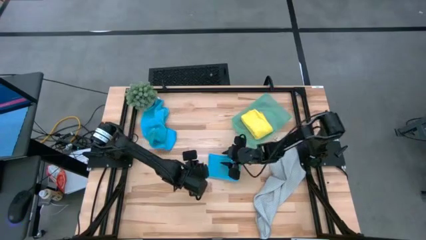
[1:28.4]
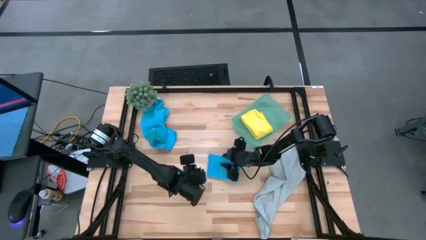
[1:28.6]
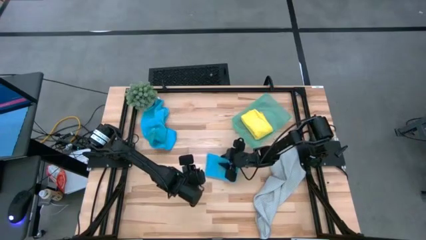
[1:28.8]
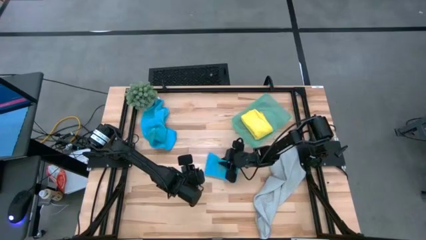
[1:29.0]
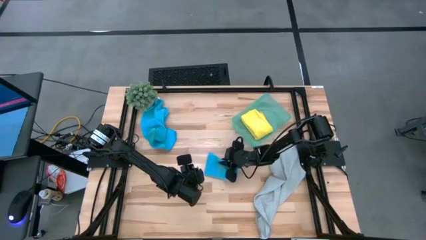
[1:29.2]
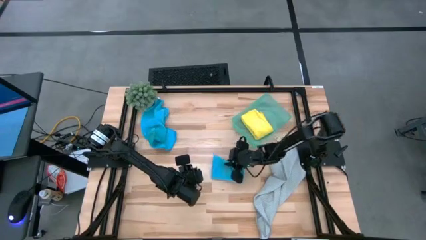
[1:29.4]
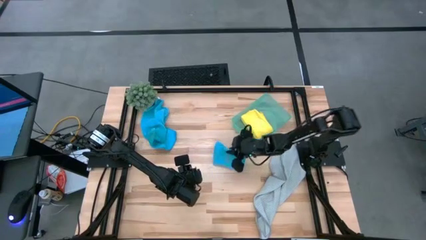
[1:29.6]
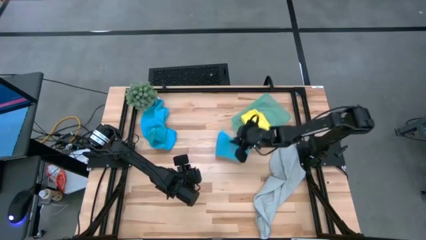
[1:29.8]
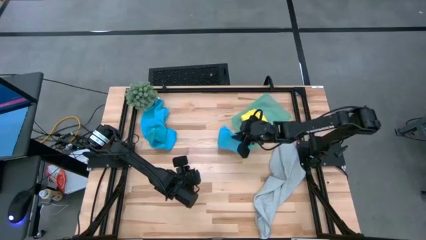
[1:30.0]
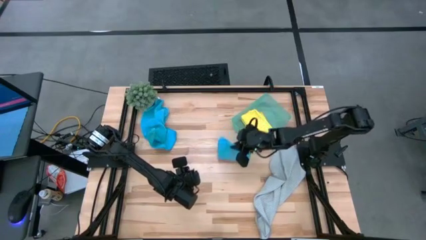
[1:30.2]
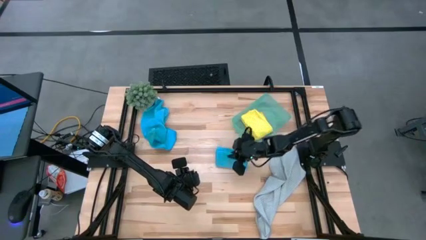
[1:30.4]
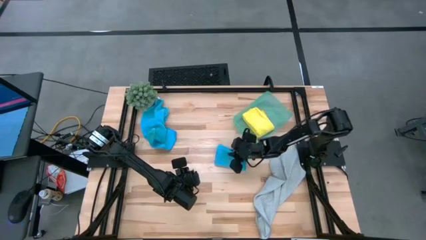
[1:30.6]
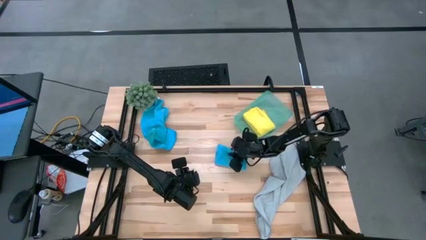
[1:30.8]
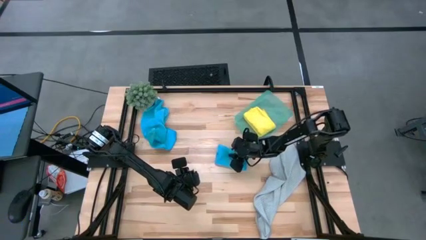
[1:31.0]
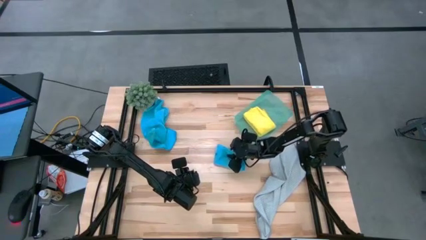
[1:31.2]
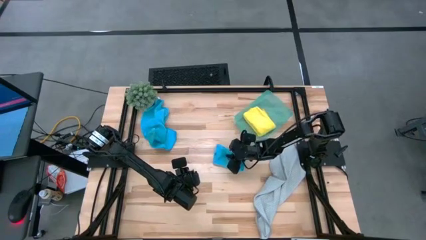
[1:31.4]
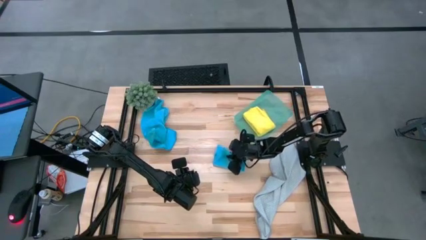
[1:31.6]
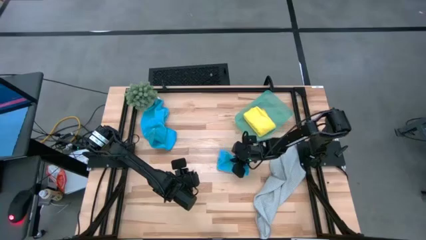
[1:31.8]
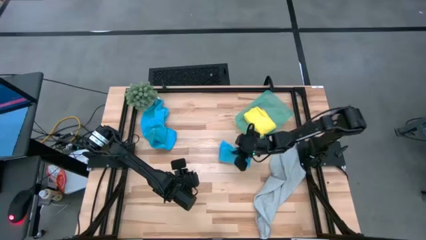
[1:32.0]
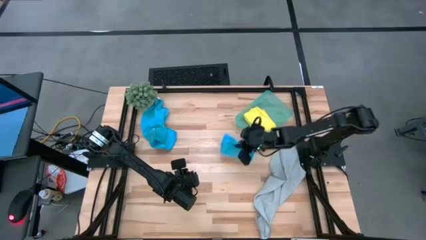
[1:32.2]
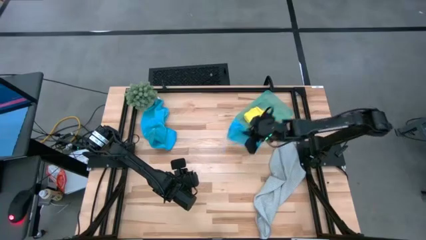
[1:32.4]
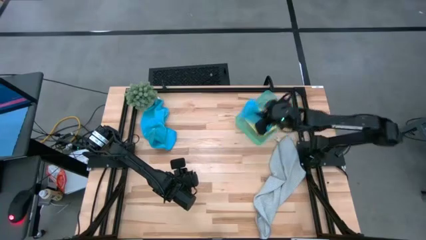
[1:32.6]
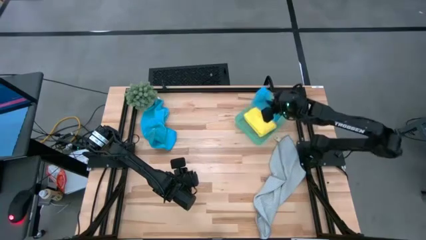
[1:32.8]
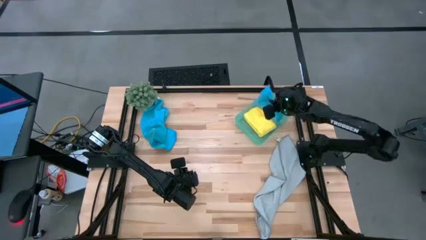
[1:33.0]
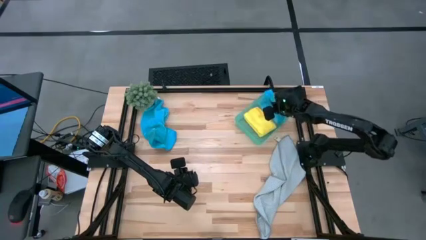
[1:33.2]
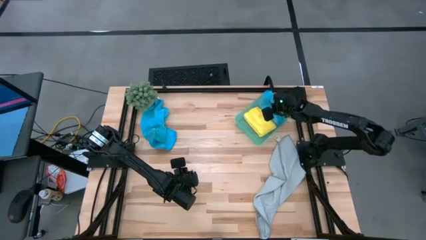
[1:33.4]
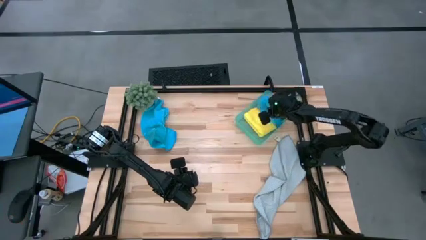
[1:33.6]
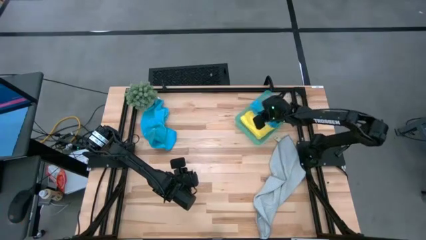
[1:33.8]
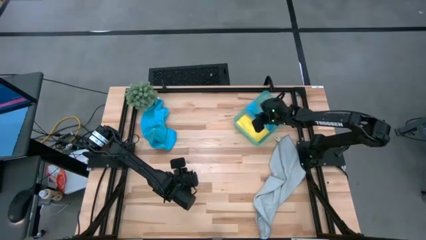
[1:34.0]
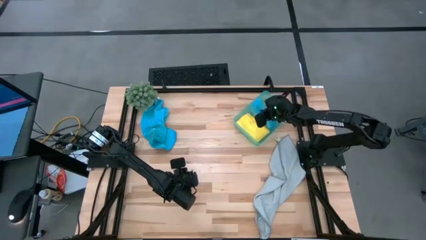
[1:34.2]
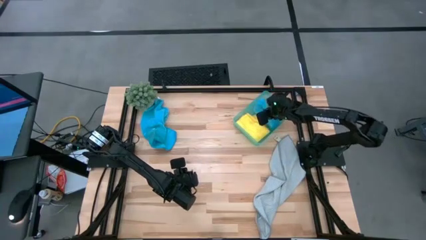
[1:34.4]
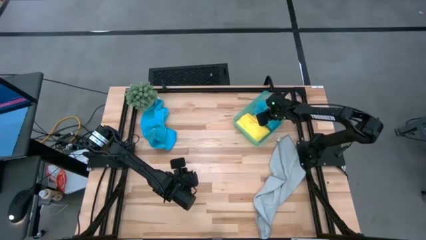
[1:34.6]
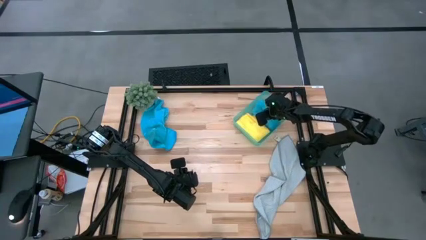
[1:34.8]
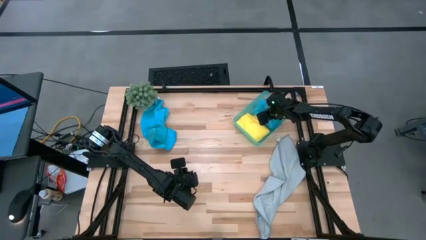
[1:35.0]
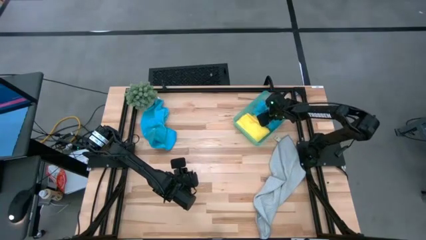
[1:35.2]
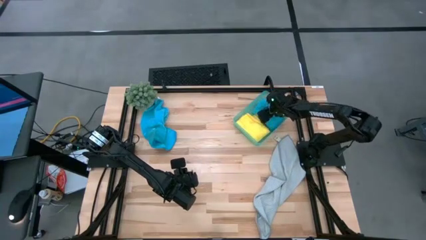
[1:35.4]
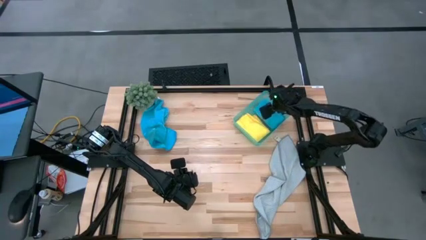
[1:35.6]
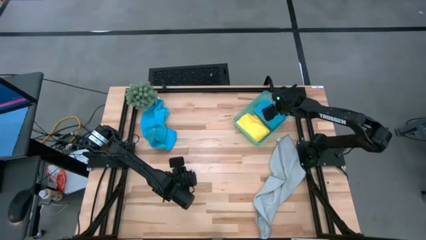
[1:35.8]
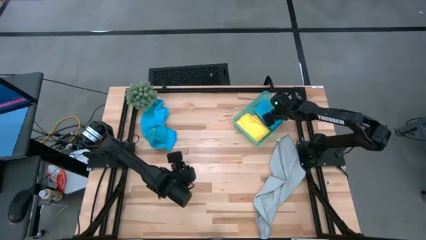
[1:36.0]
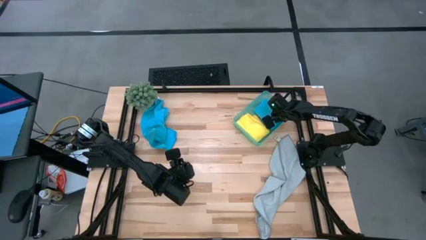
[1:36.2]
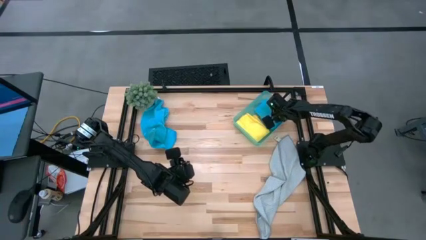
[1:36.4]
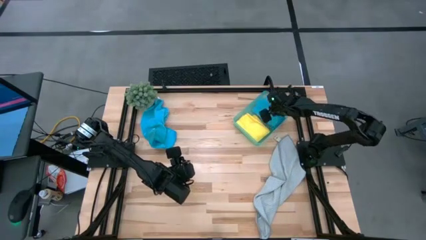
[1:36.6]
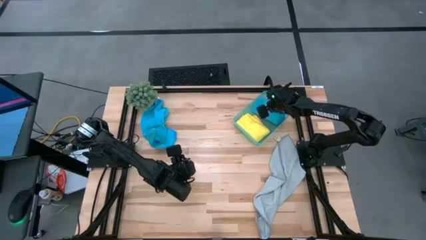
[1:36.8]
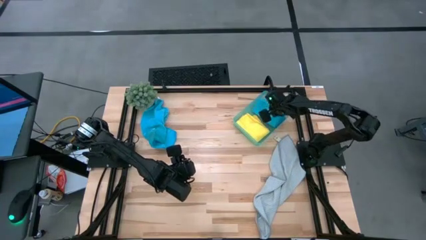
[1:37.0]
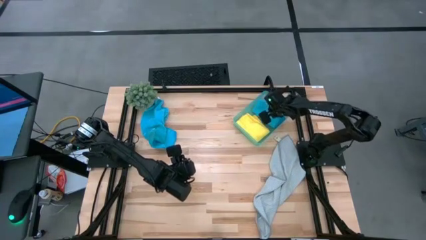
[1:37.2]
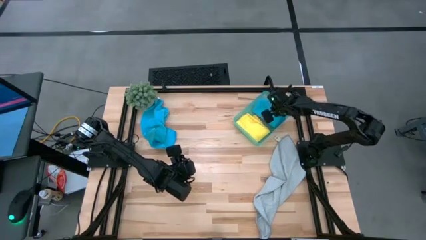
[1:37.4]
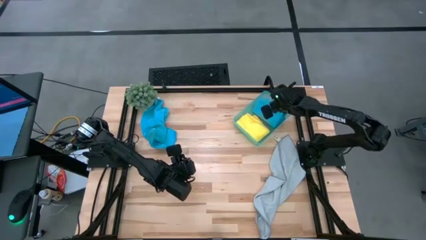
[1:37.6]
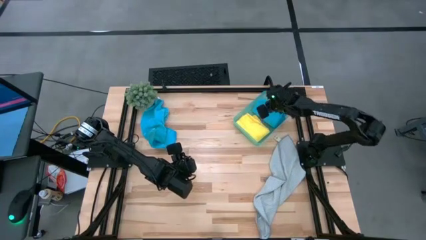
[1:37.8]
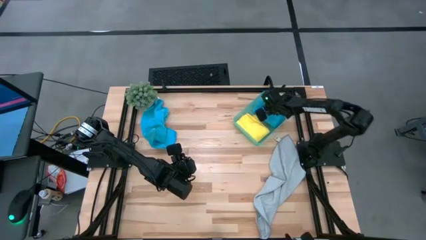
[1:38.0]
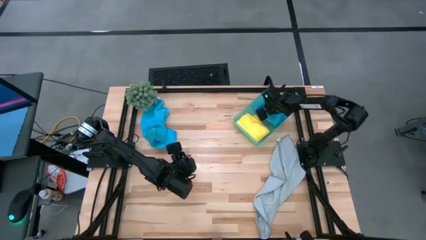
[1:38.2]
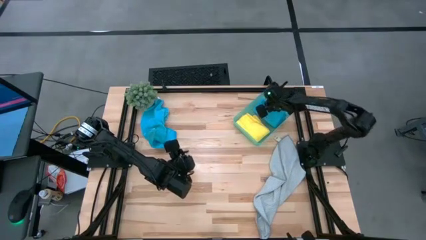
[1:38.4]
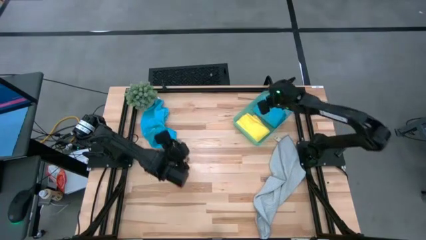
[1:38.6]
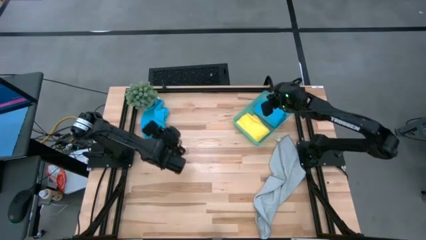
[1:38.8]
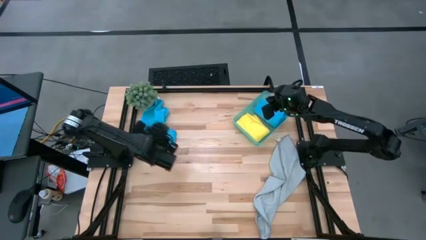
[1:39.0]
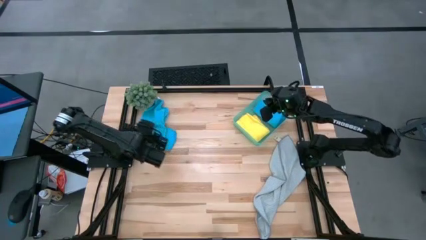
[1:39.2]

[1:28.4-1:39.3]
Task: Fold microfiber towels
Put the right blue towel into the blue bin

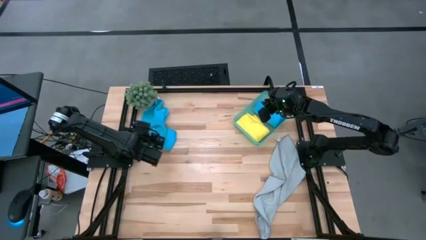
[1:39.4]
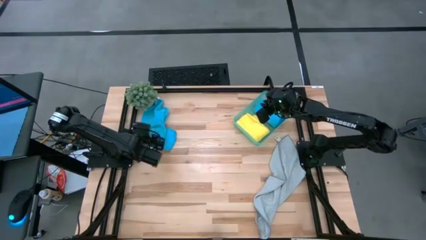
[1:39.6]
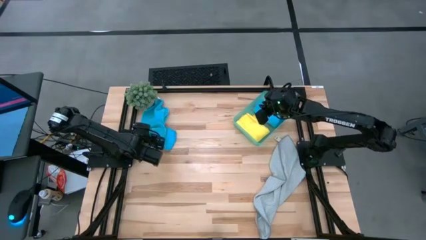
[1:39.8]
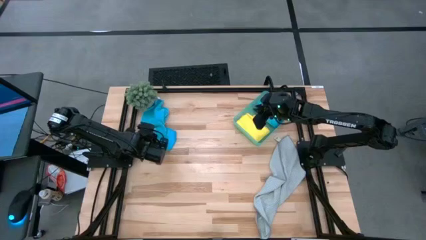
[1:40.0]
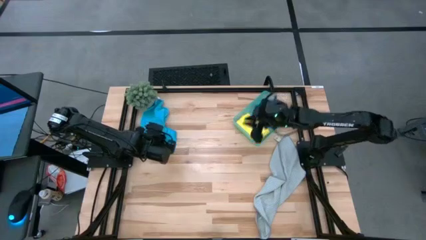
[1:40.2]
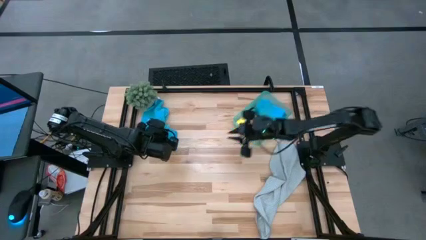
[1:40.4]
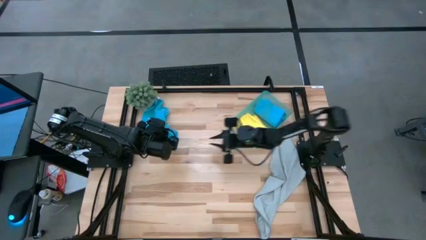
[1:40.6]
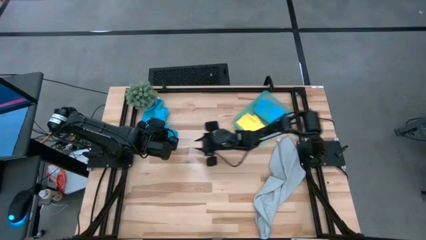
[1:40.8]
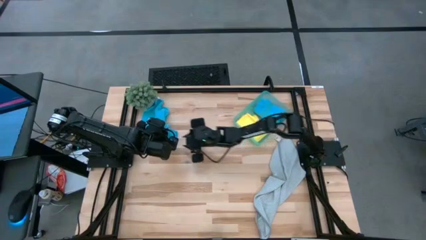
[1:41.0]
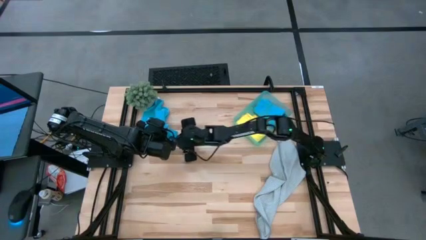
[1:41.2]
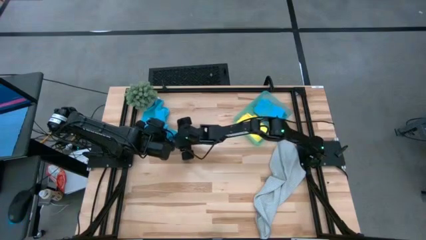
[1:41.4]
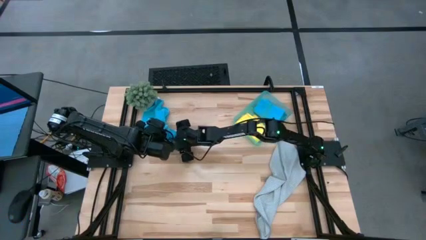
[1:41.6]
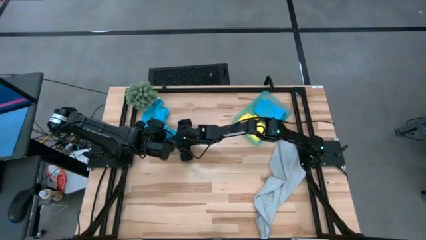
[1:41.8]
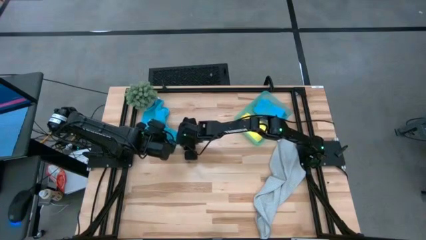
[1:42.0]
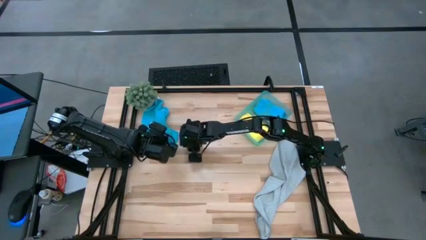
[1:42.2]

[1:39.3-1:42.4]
Fold the blue towel

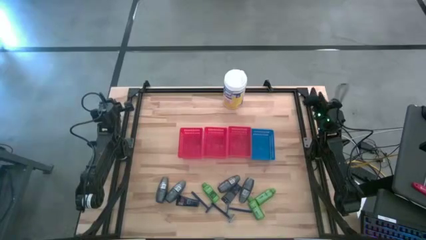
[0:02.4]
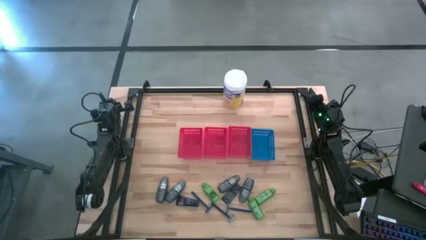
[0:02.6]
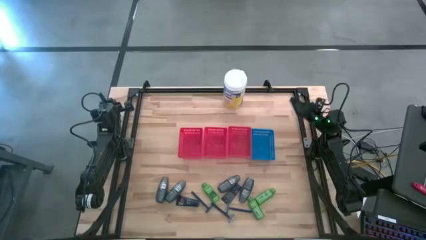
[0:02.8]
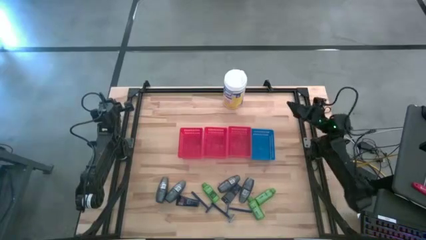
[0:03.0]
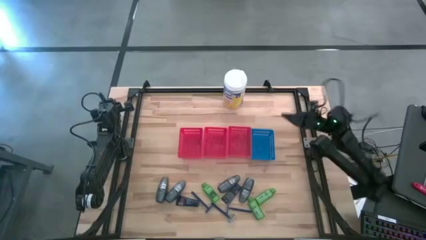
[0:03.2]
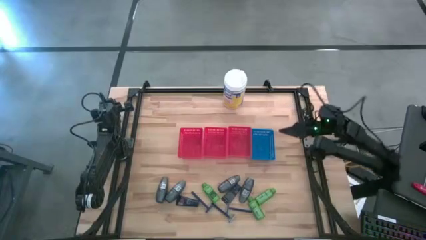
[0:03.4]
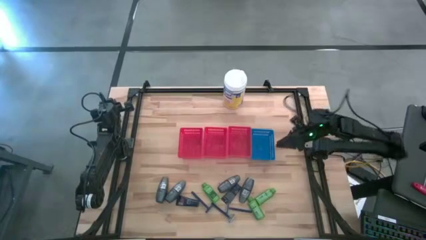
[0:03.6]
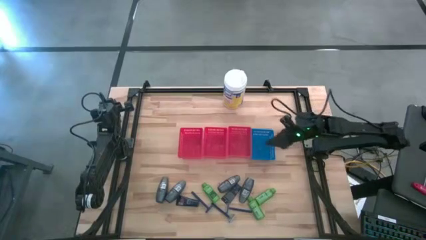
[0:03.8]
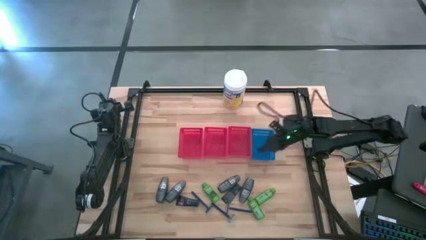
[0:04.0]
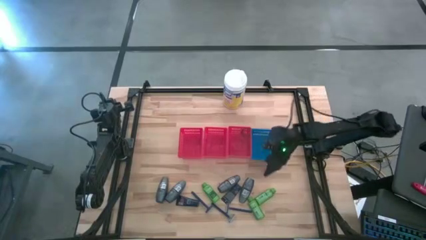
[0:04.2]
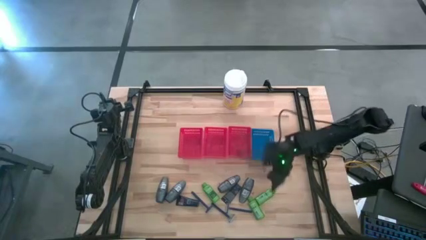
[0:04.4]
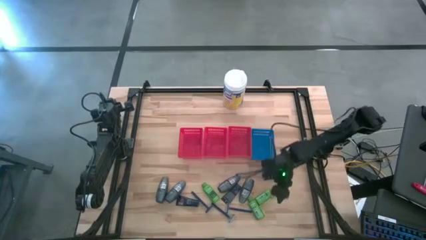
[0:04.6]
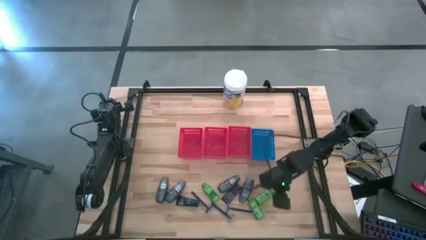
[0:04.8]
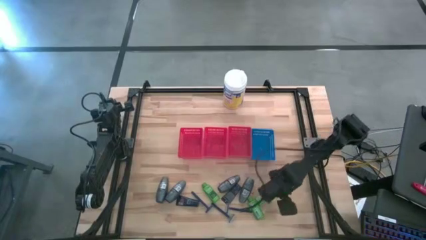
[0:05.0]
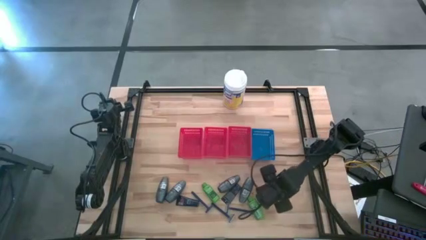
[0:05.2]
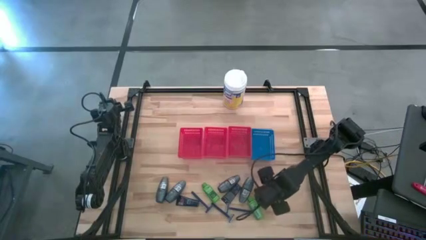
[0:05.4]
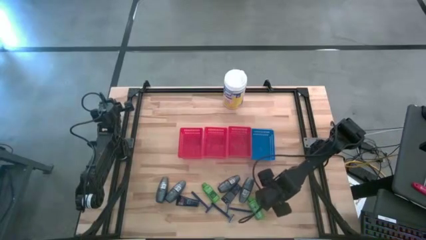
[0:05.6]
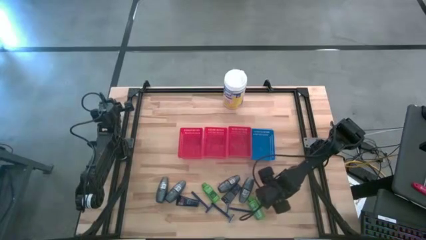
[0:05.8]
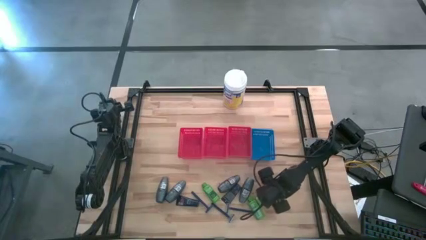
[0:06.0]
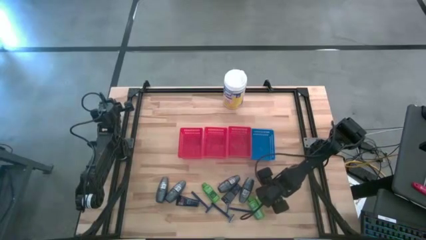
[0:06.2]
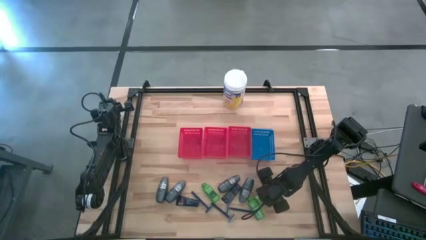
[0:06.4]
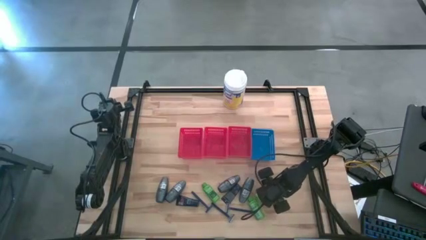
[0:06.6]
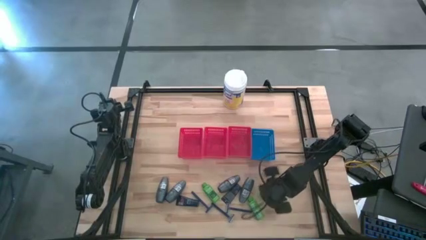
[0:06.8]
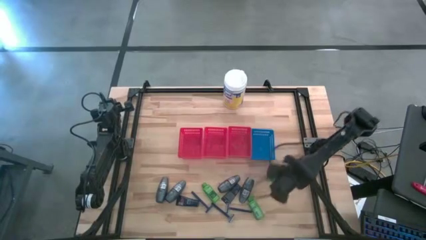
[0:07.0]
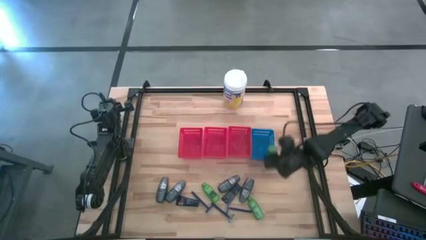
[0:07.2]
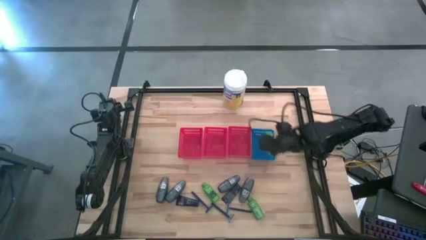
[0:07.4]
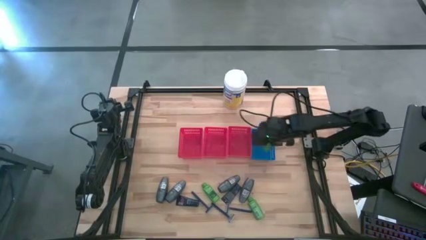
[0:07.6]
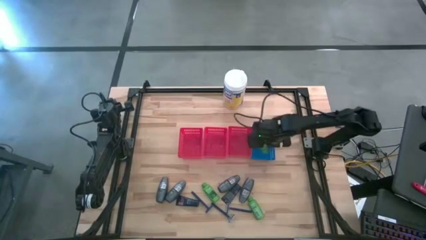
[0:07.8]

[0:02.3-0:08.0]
Task: Pick & Place Travel size toiletries
Put the green shampoo into the blue bin
